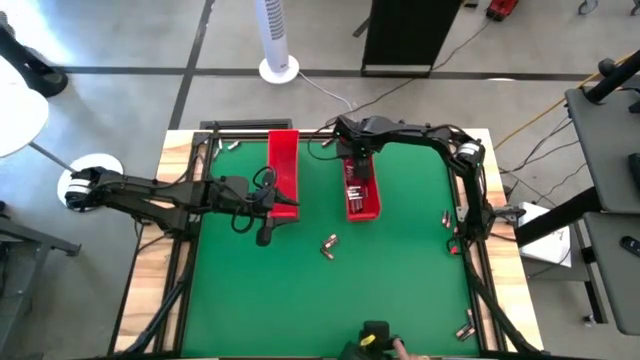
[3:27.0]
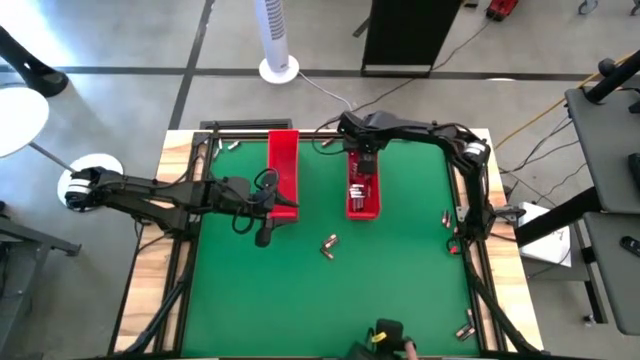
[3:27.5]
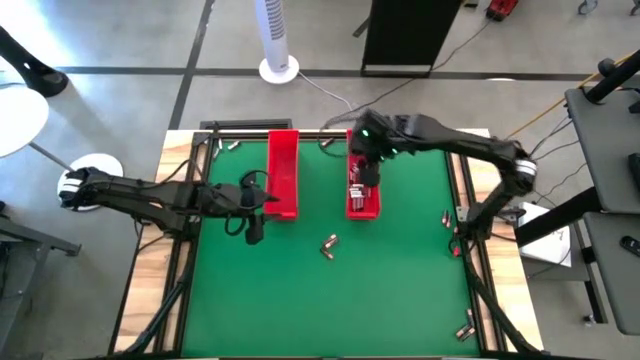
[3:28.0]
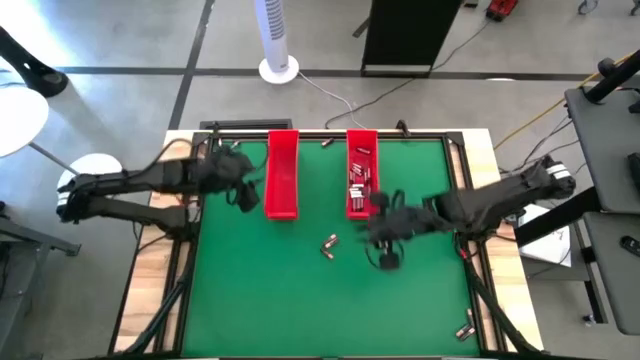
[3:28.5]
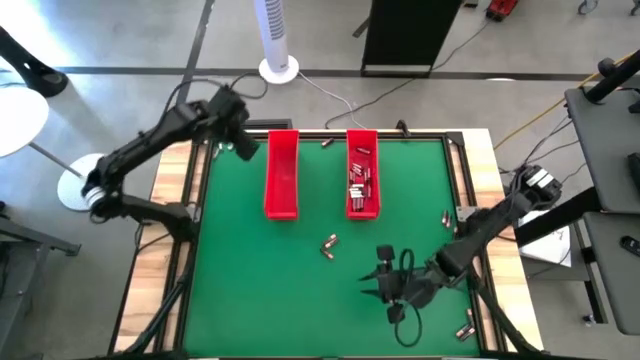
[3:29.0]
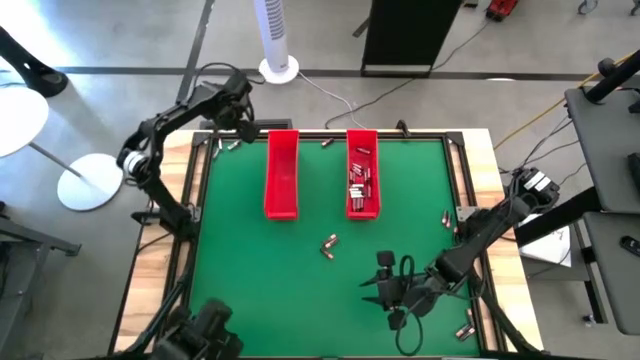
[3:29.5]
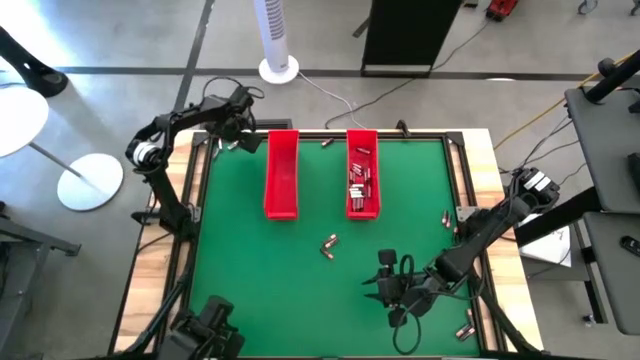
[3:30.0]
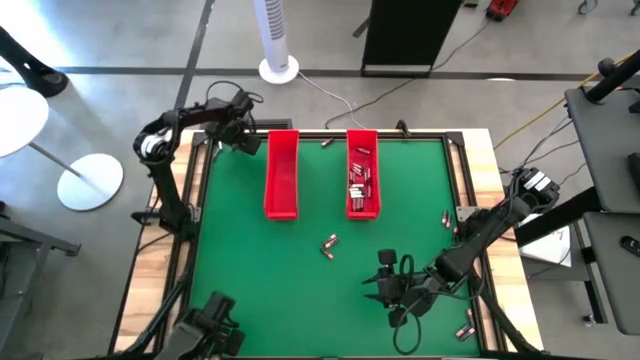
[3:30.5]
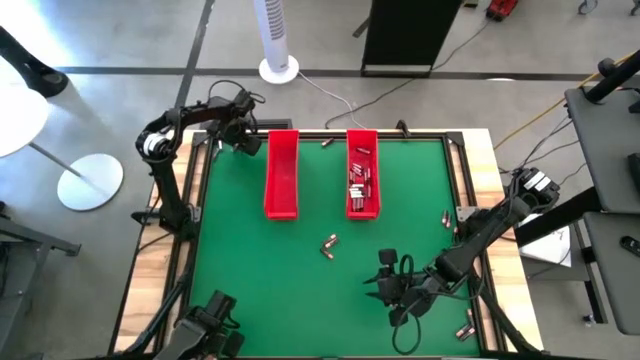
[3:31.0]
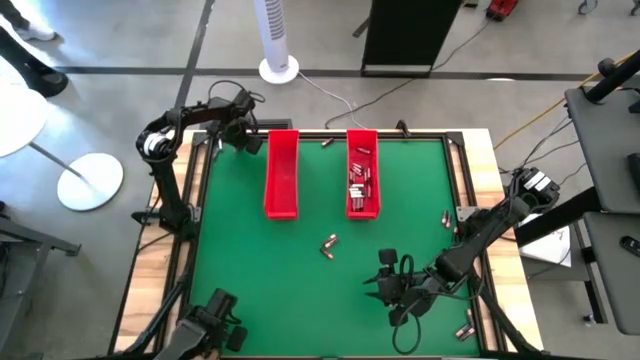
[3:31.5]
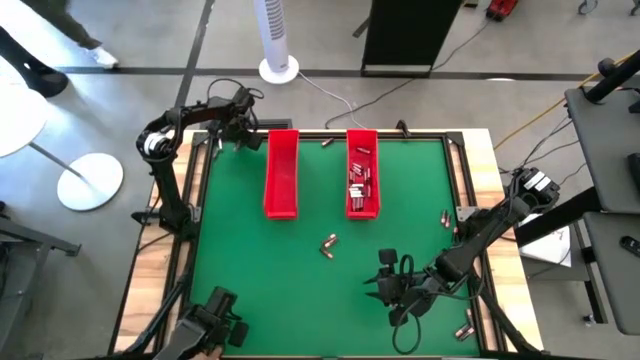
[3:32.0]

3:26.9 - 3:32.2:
Task: Sort batteries
Put the silver battery into the right red bin

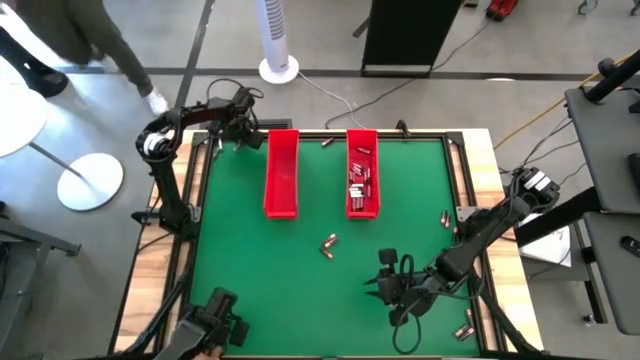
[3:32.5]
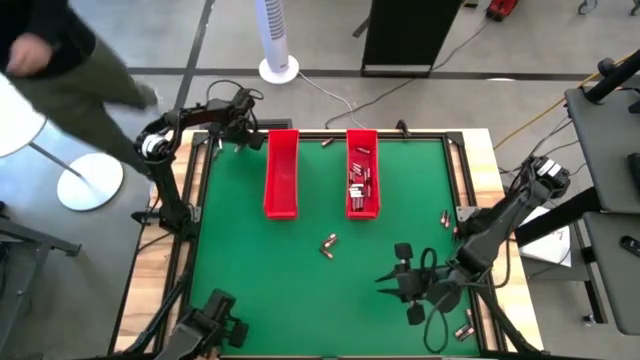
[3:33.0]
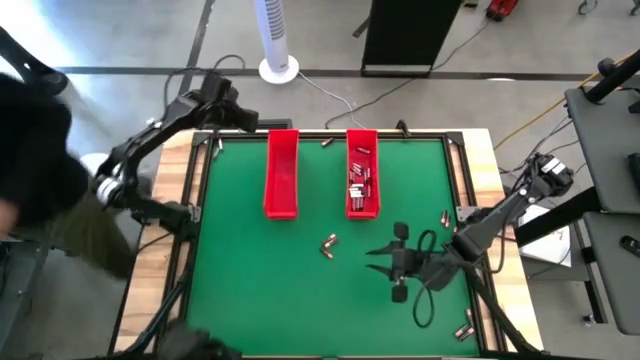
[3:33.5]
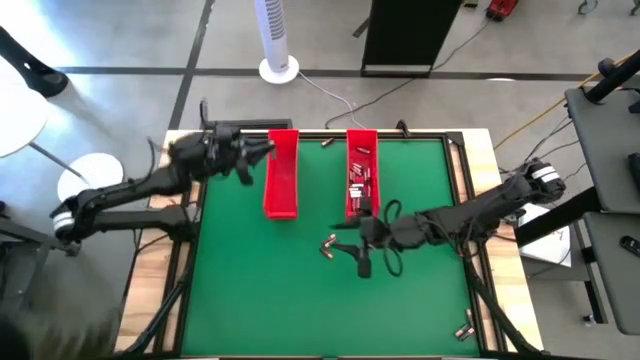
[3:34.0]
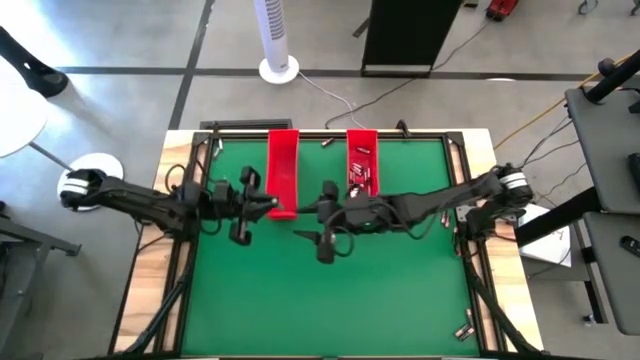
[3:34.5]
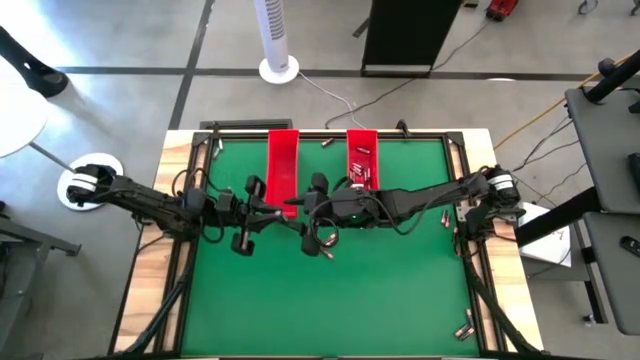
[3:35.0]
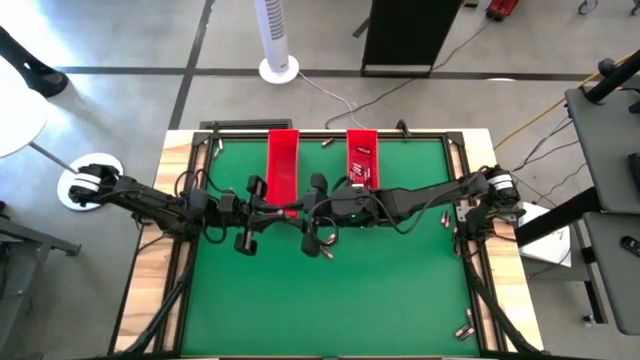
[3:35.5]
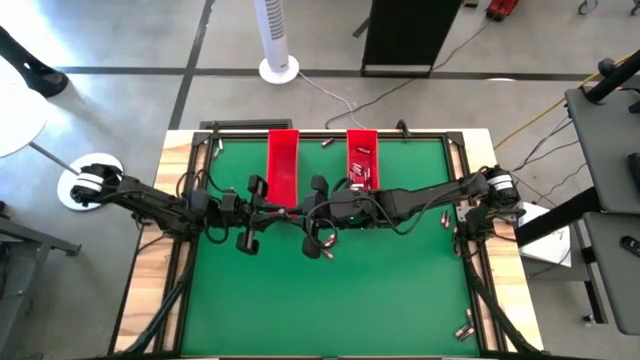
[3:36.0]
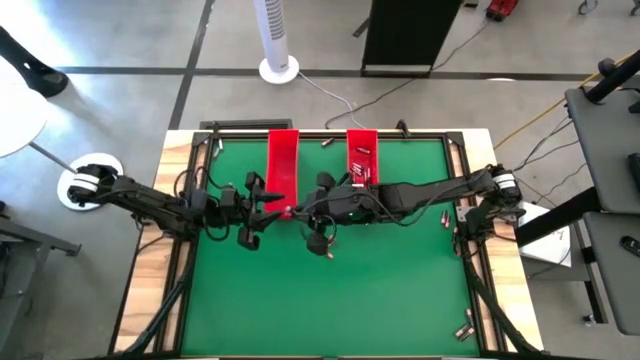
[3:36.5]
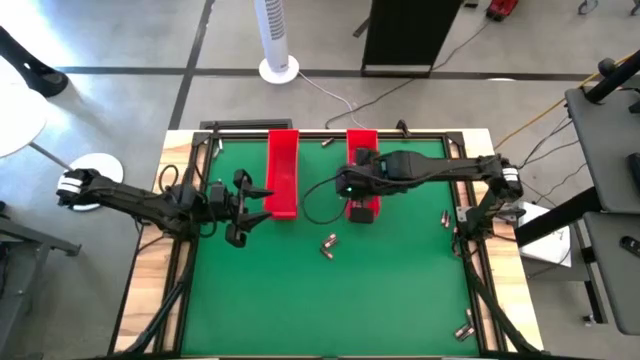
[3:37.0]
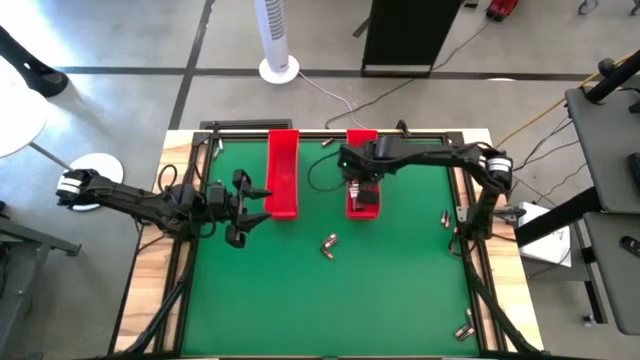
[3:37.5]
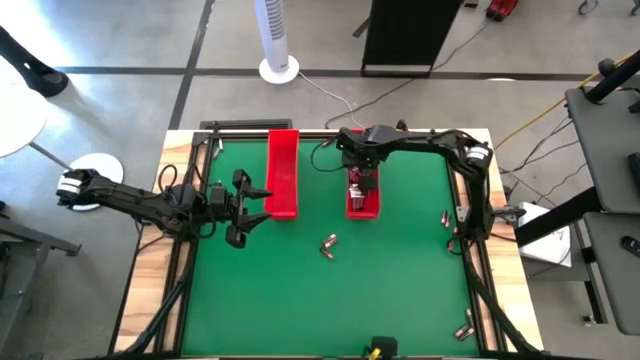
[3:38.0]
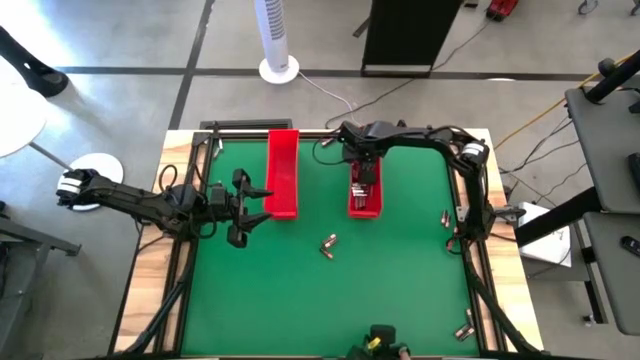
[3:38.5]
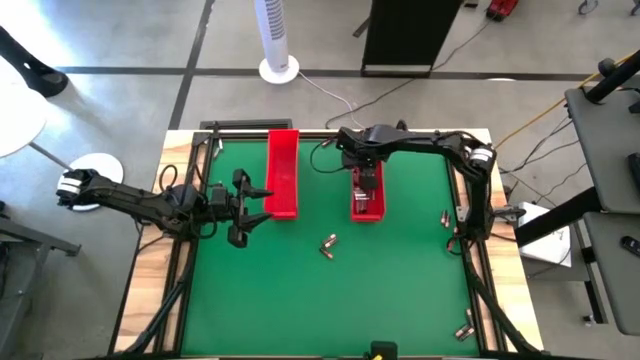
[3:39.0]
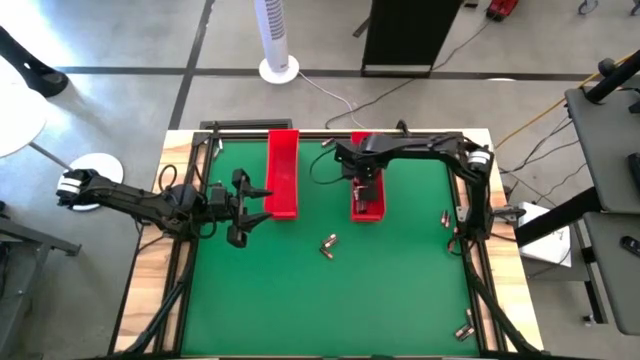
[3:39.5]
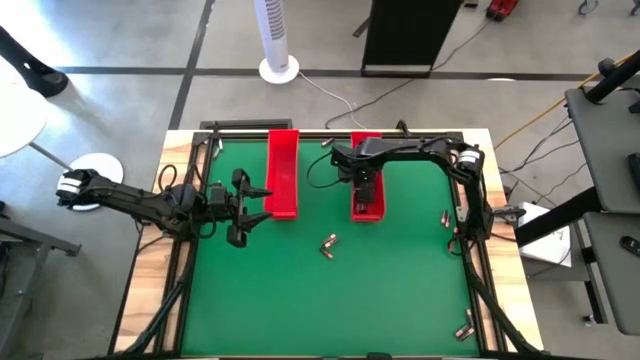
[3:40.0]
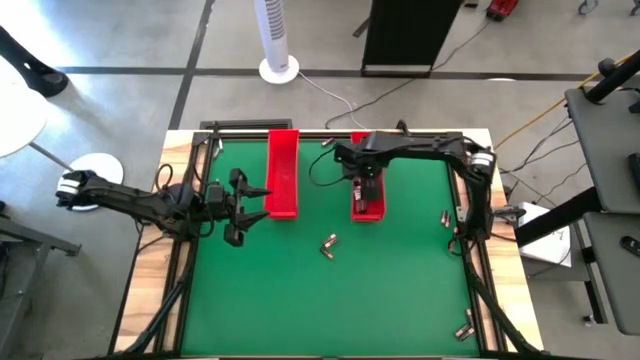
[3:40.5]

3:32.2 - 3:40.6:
Put the silver battery into the right red bin

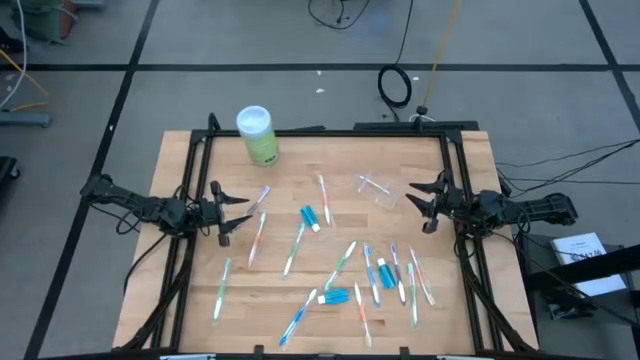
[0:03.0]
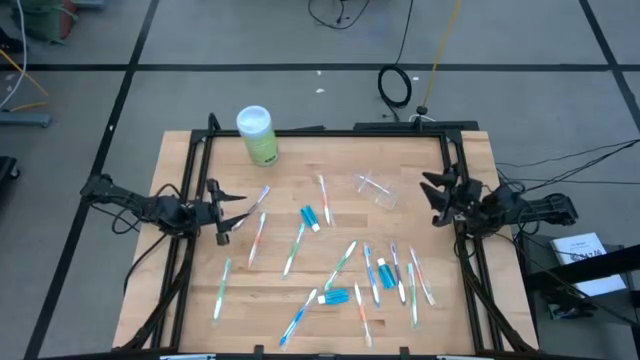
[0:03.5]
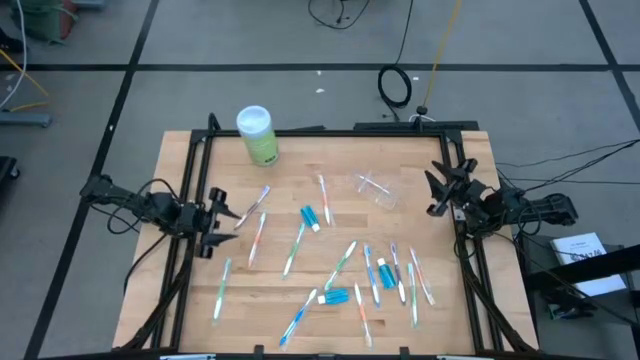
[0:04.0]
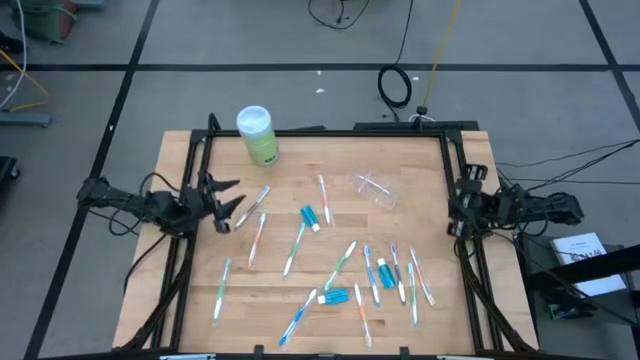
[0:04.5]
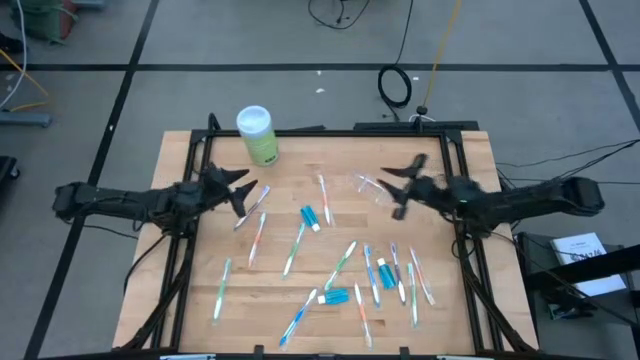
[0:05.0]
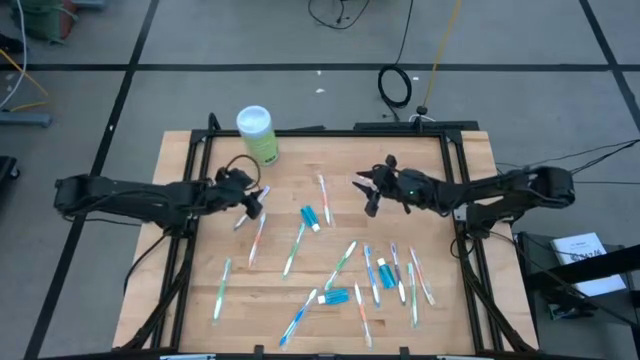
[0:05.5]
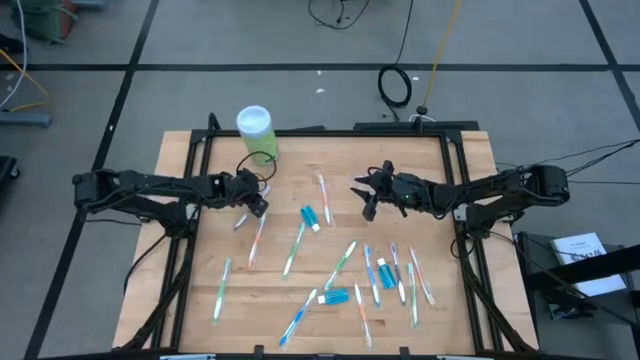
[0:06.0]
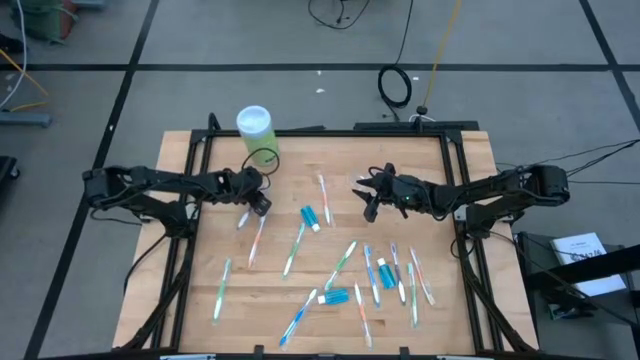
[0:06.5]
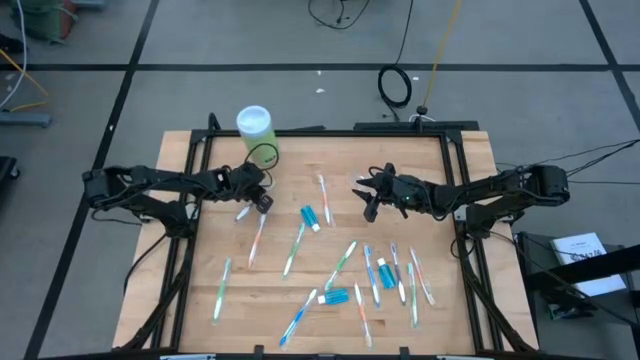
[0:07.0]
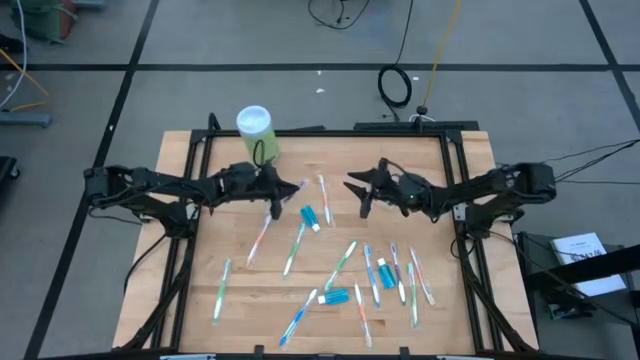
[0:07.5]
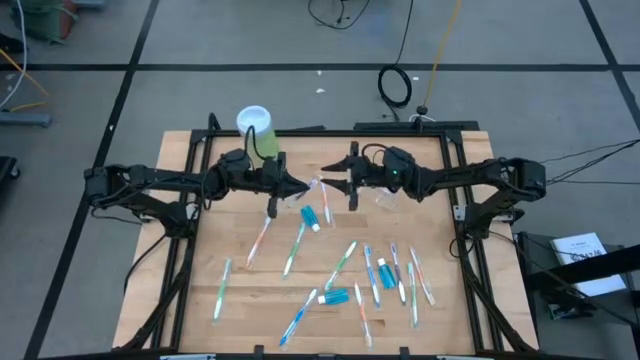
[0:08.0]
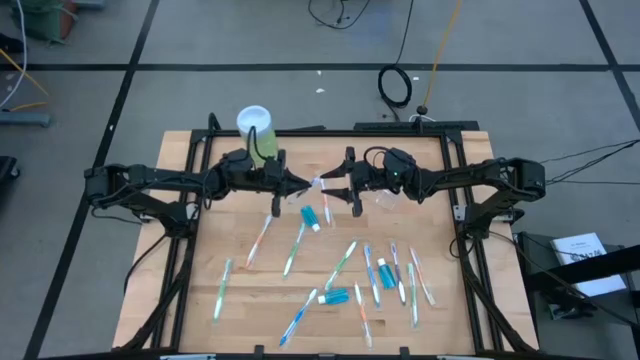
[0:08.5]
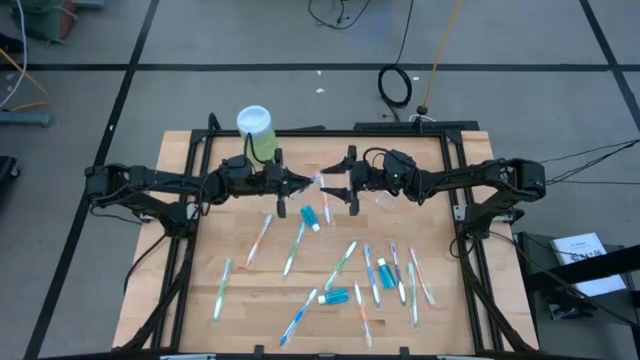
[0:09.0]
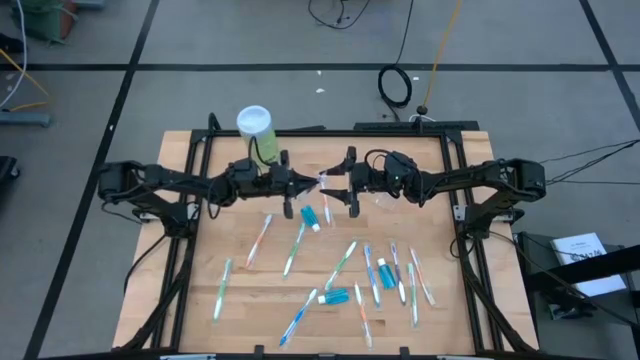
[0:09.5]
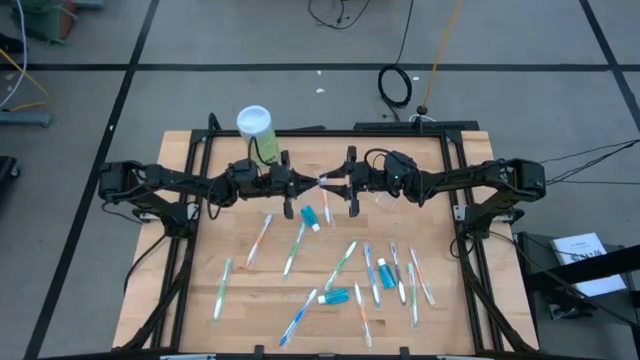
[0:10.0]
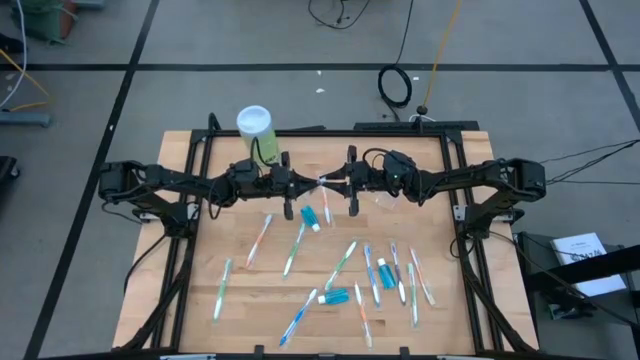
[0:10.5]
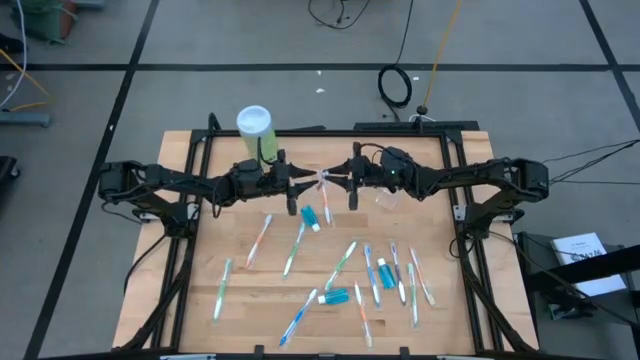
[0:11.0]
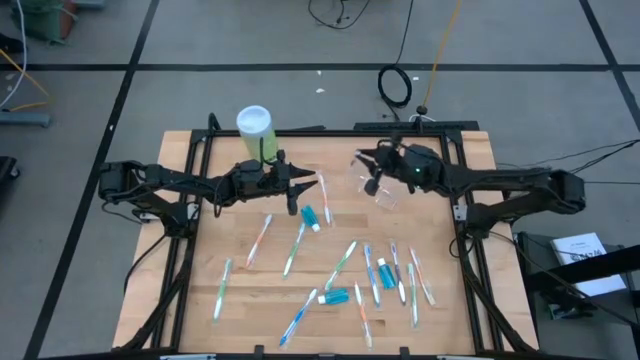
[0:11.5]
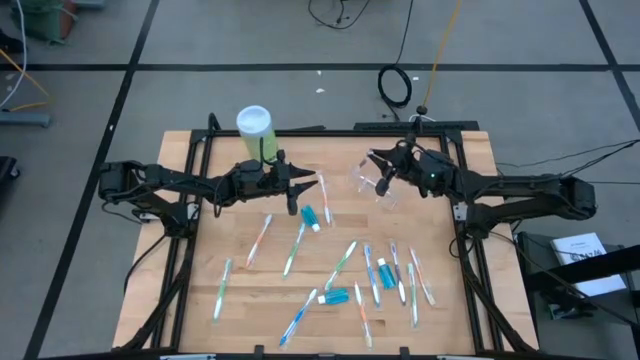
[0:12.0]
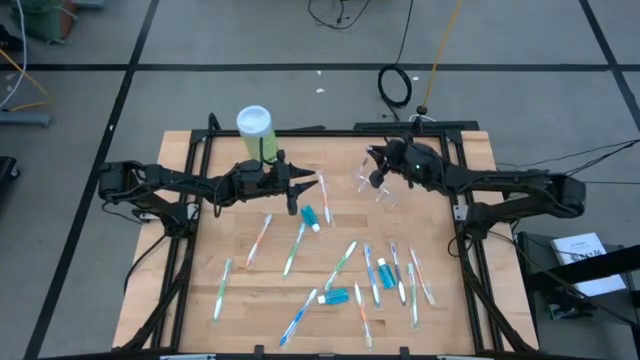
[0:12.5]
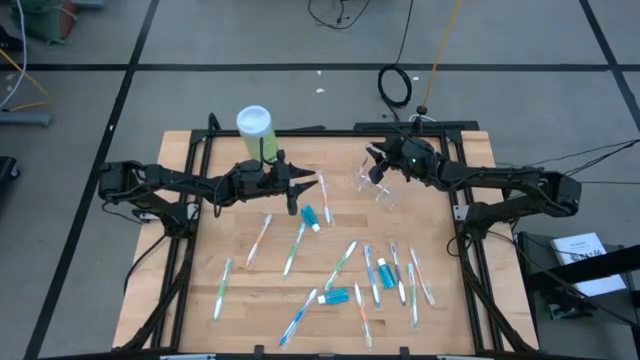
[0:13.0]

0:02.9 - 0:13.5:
Task: Pick & Place toothbrushing station
Put the violet toothbrush into the transparent organizer
